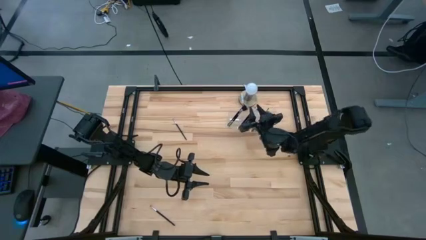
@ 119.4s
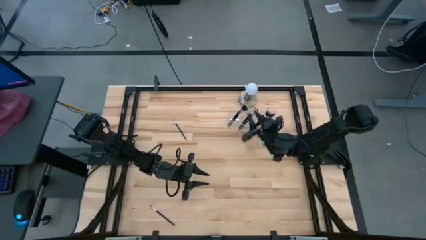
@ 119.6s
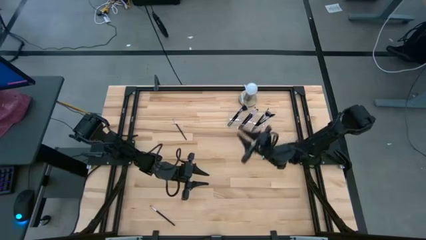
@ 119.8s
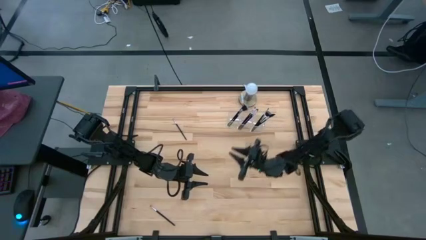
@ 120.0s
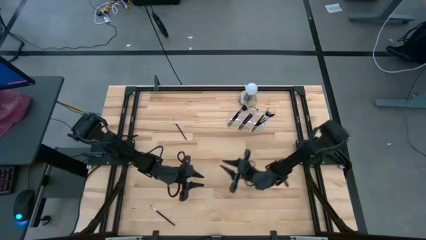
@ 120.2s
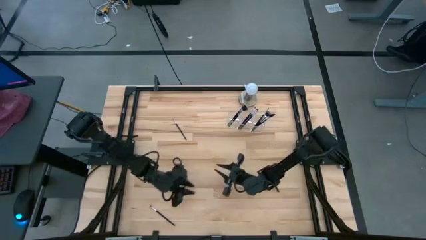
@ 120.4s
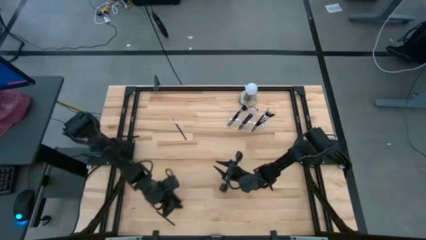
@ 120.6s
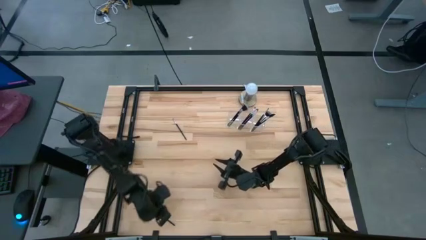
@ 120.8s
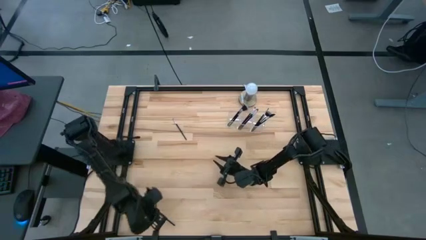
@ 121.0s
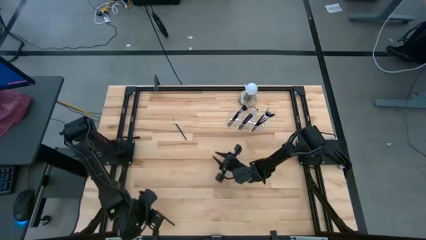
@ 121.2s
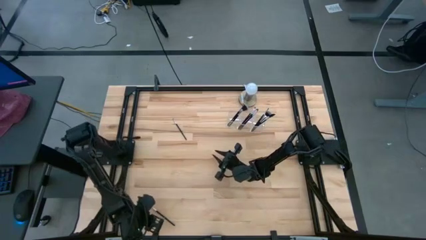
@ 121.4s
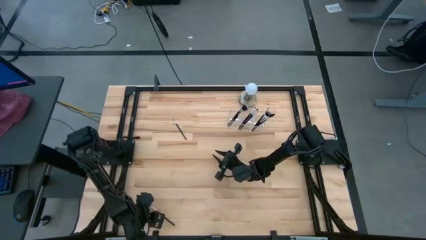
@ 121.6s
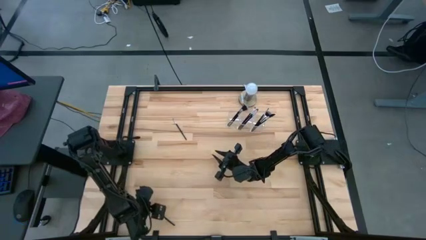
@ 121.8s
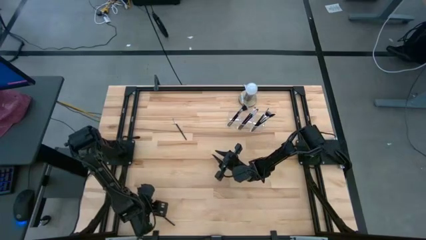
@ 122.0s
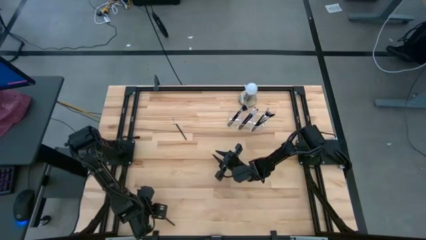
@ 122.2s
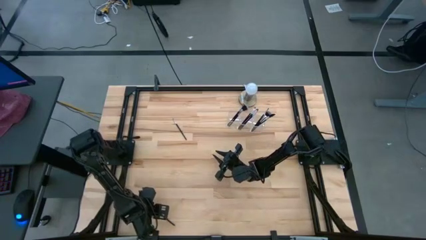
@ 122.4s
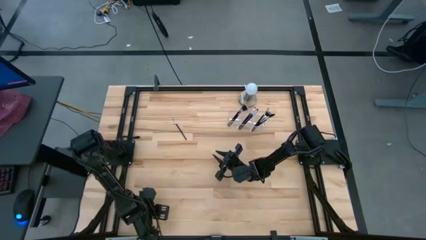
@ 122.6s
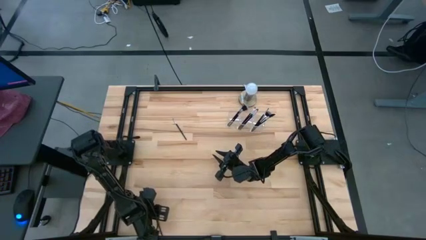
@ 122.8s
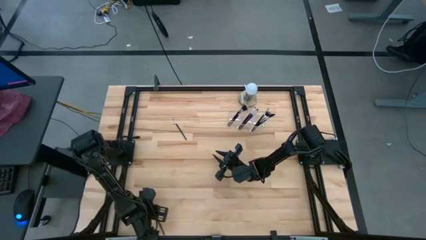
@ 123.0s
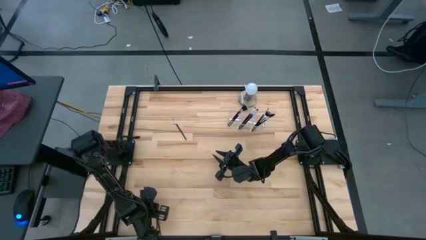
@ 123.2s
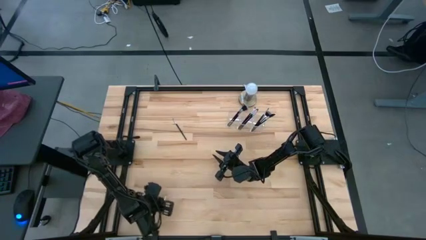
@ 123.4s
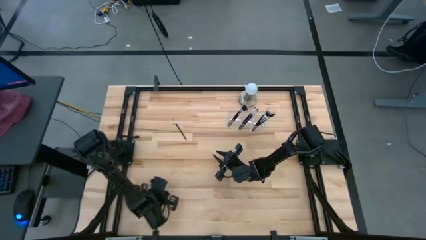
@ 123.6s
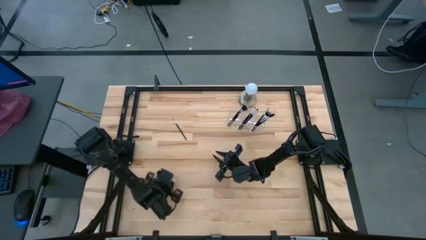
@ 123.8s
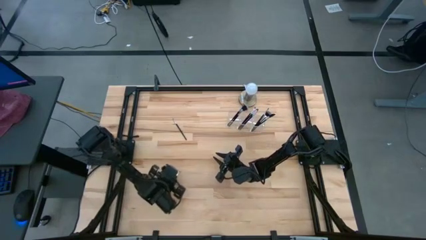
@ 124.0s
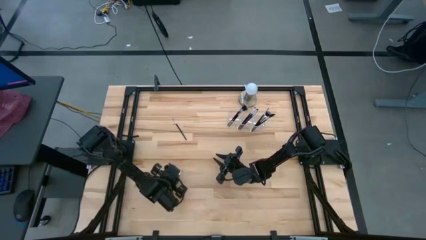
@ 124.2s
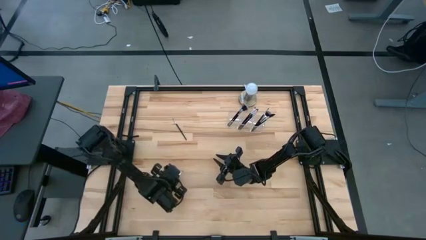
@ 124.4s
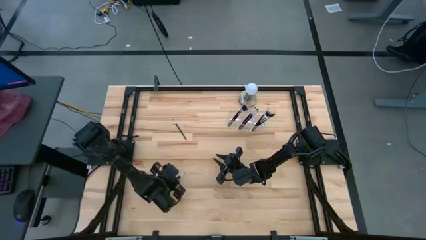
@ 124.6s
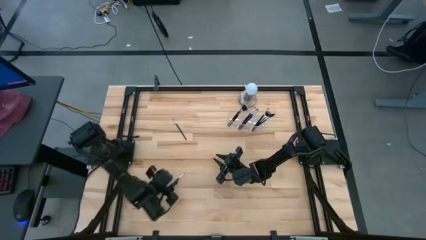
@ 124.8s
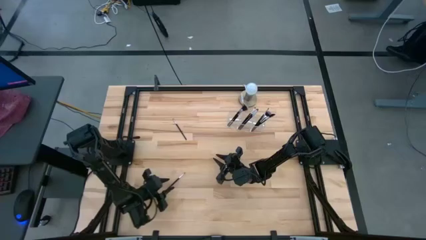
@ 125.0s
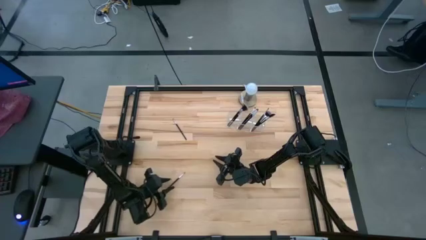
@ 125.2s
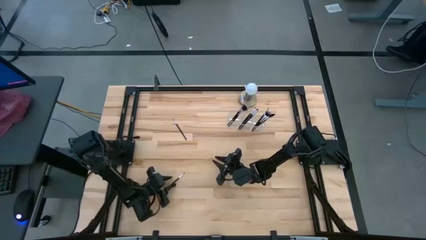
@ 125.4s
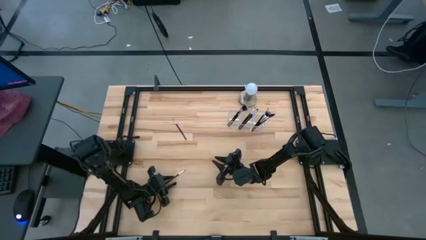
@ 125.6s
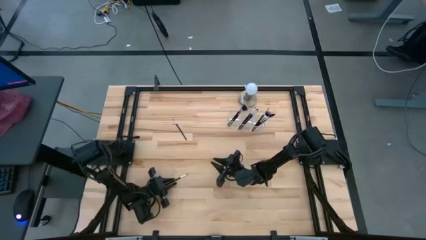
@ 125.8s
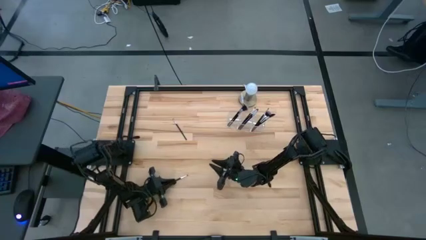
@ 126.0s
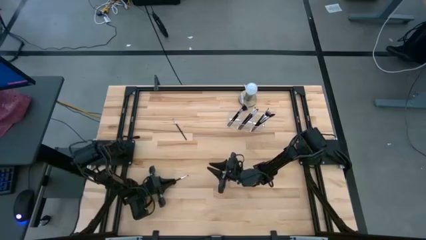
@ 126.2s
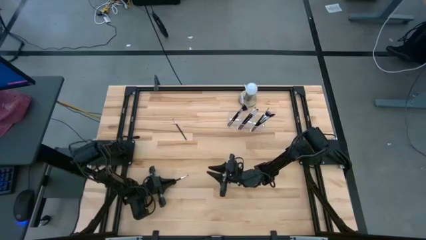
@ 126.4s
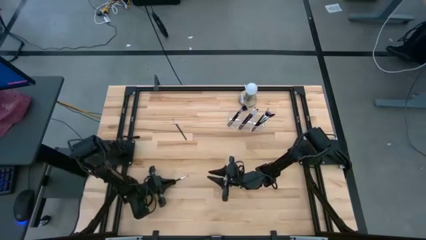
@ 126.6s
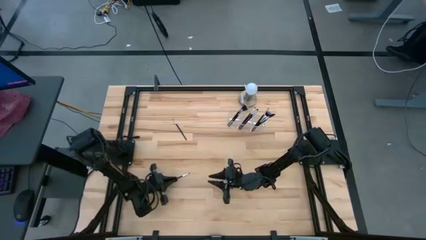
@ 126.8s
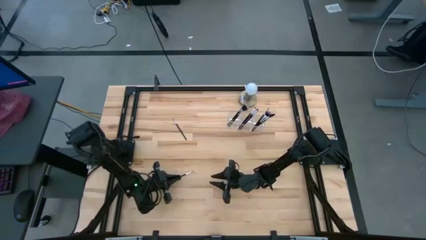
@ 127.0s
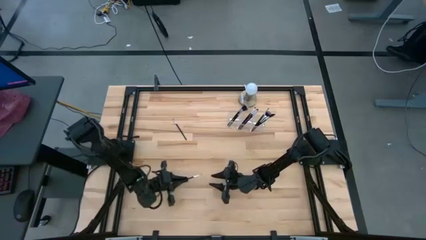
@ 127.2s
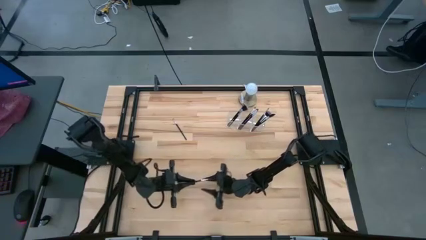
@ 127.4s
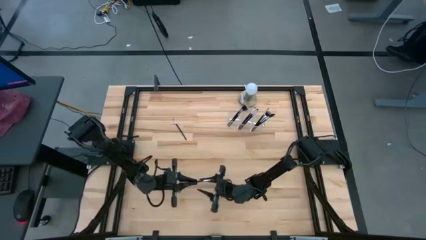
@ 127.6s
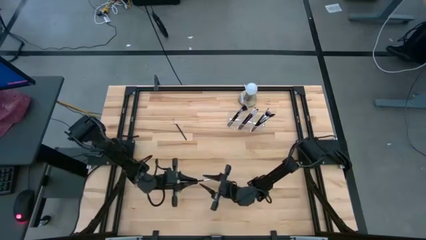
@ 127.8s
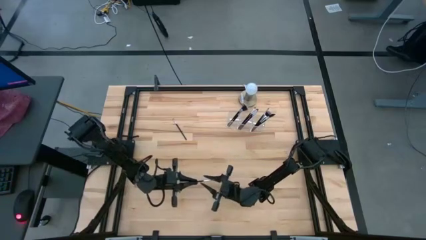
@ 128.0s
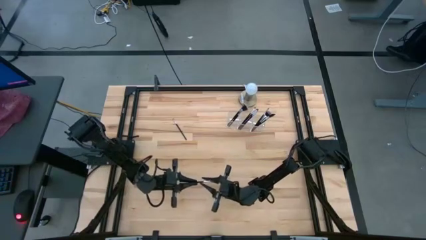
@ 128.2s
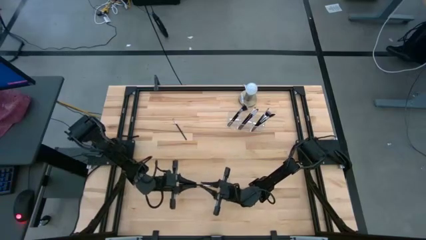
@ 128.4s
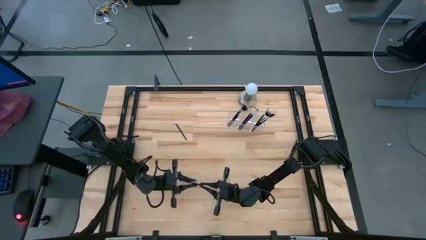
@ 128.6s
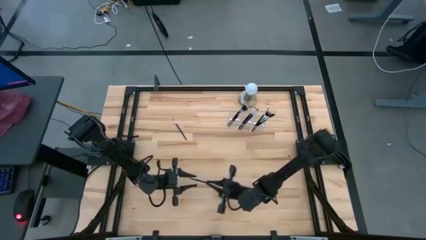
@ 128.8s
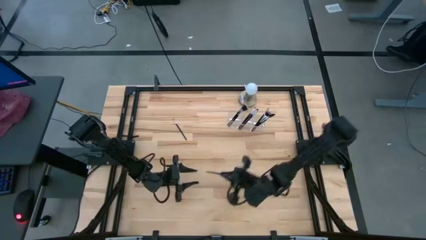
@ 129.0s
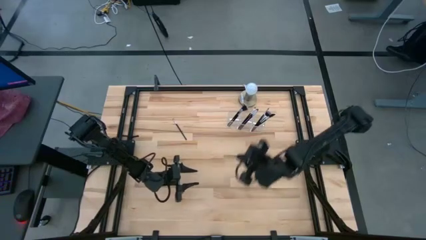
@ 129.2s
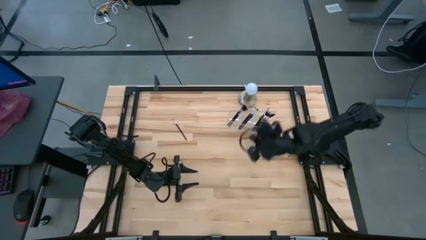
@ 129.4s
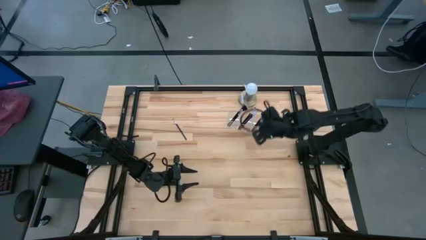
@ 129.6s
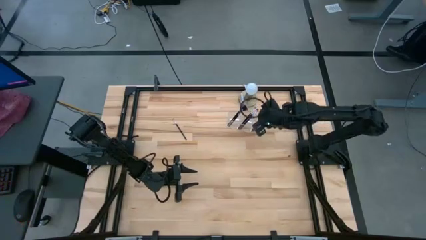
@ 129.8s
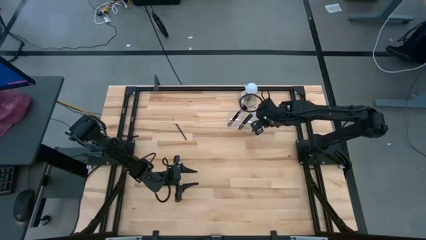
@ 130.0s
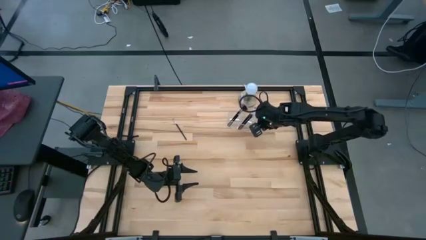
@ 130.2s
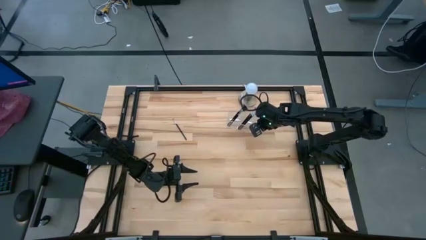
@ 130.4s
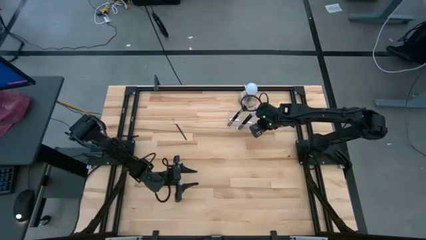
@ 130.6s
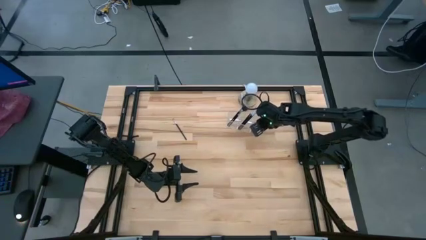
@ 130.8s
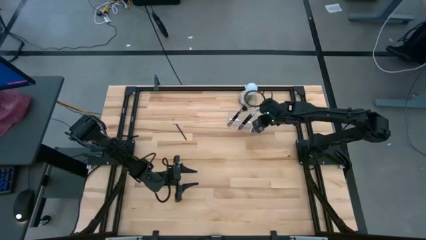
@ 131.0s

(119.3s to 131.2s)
Task: Put items in baskets/containers
Put the eyeshadow brush into the transparent organizer

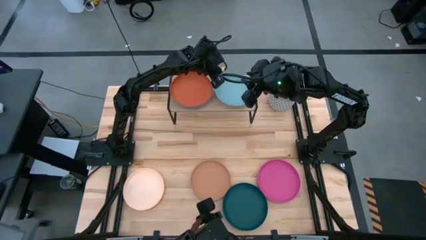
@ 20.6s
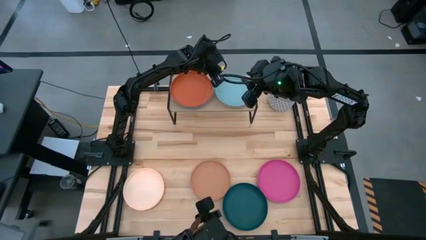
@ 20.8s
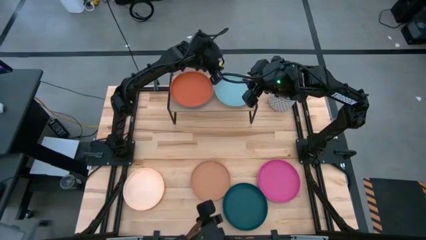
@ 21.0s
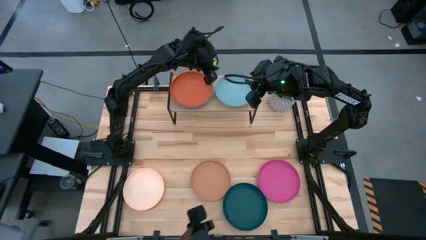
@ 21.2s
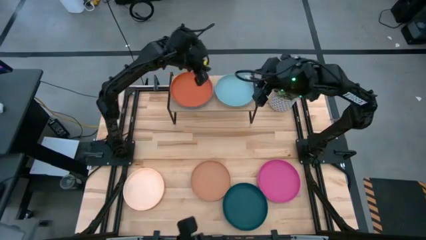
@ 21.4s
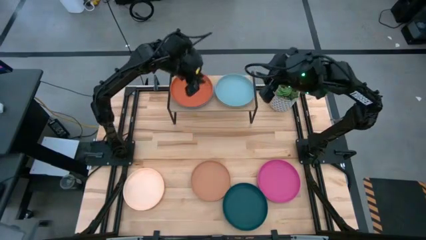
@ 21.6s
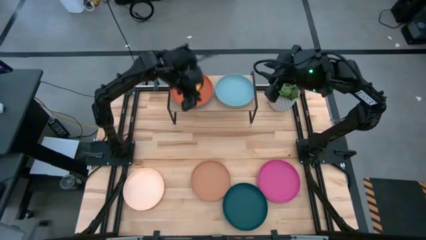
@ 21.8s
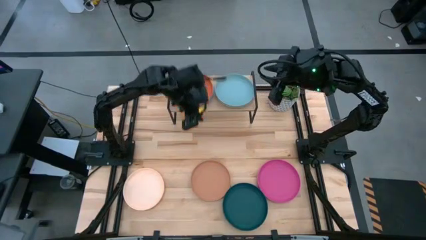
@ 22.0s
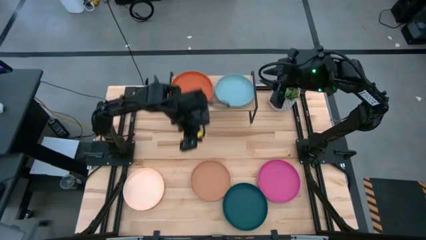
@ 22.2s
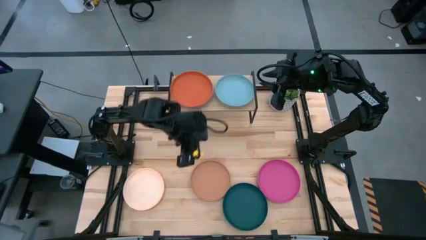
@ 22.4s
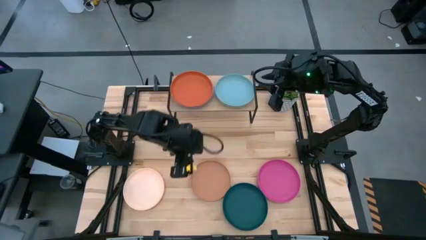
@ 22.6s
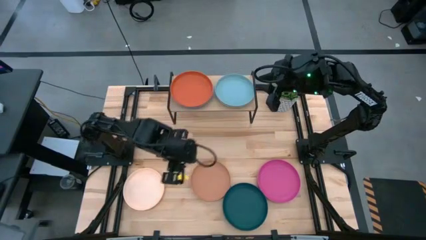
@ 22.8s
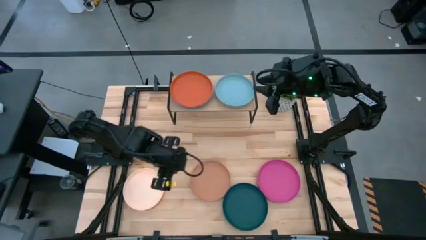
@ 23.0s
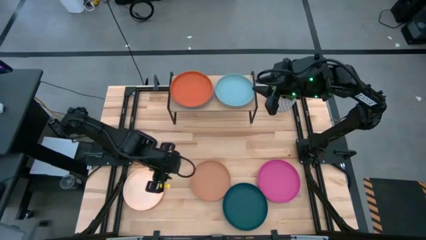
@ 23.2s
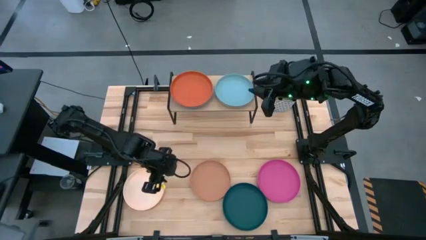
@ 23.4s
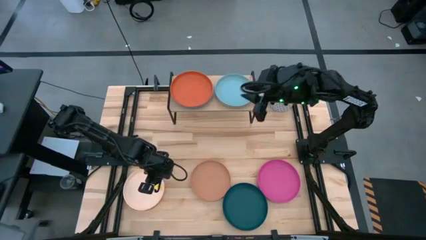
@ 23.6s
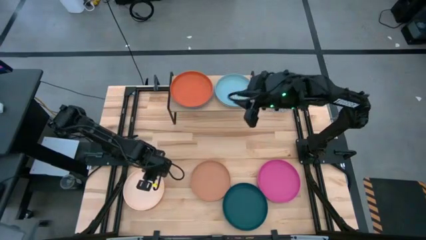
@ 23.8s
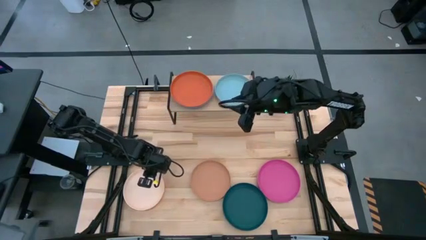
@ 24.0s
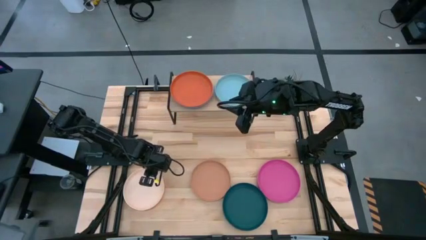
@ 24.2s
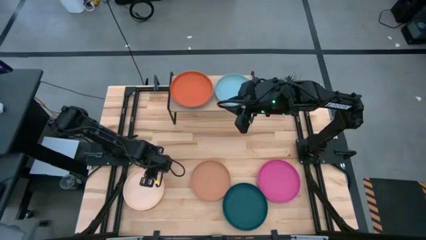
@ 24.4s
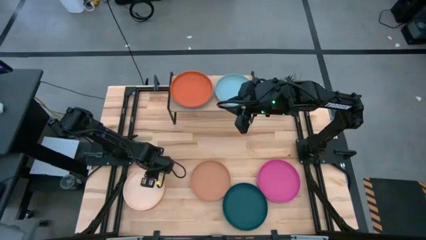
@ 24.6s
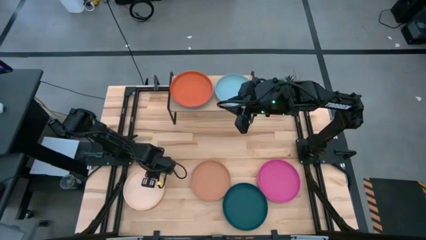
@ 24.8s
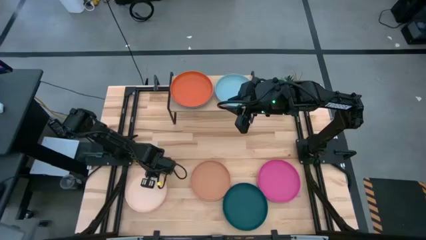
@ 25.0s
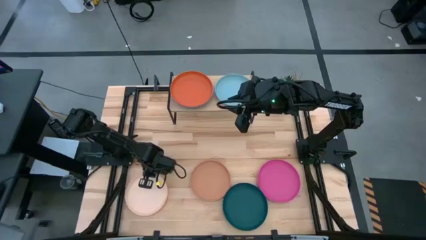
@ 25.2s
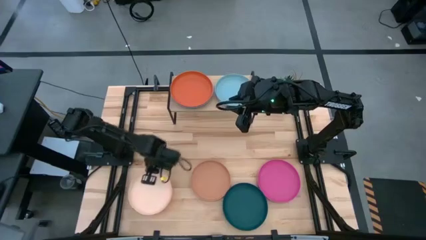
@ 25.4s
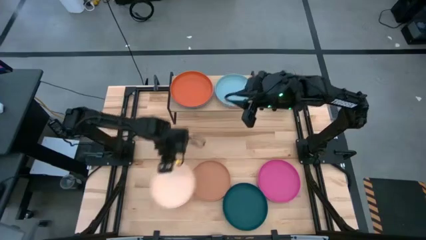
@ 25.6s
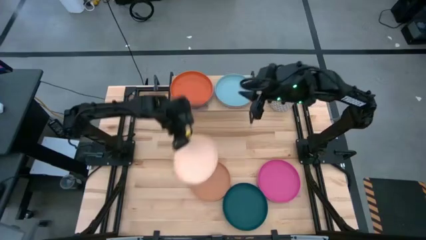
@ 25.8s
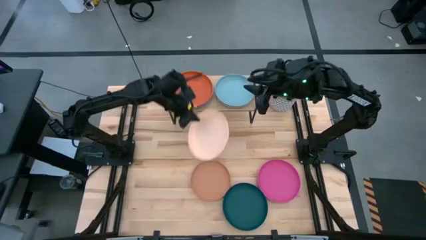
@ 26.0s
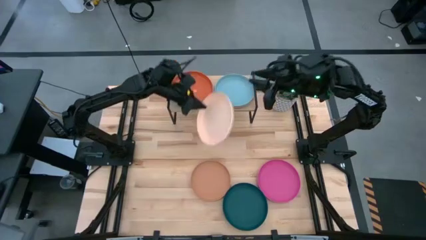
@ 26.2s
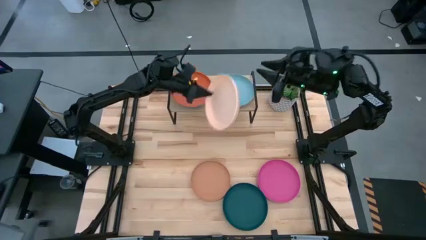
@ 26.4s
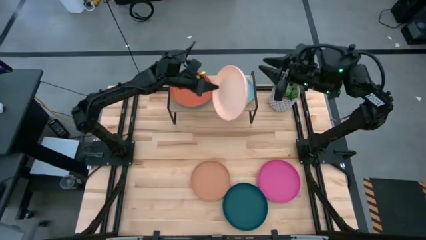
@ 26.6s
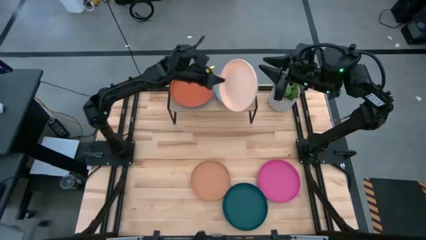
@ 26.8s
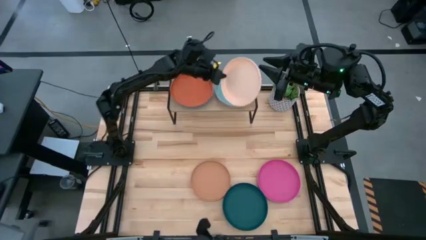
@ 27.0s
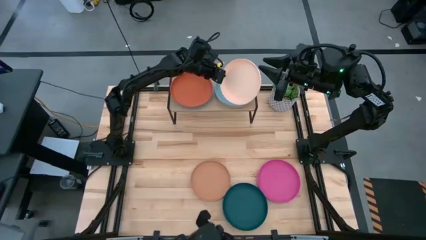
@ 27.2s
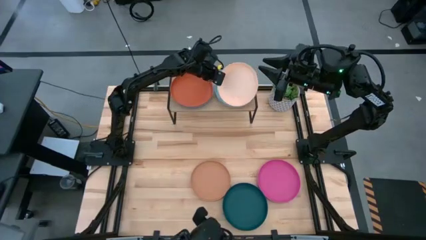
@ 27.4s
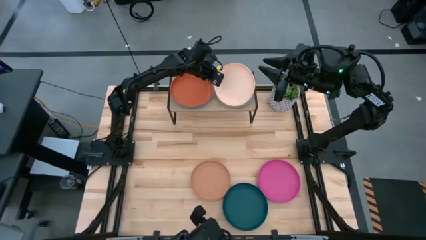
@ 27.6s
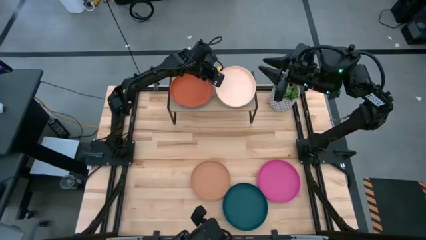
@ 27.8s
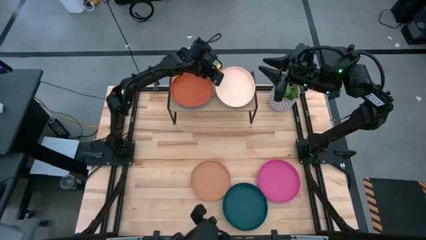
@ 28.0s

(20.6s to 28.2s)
Task: Place and stack plates onto a shelf
Stack the white plate on top of the cyan plate on the shelf
